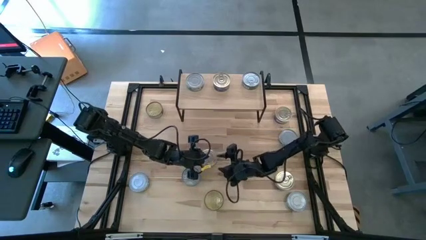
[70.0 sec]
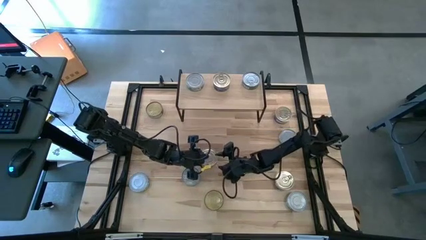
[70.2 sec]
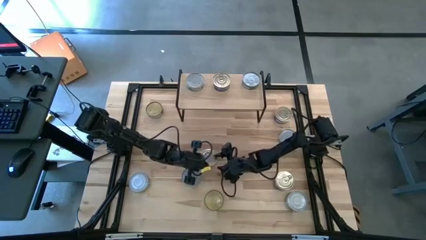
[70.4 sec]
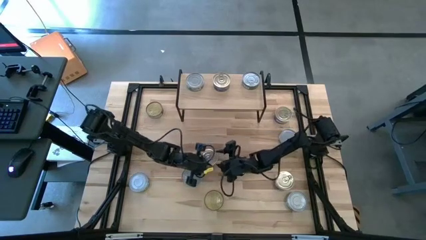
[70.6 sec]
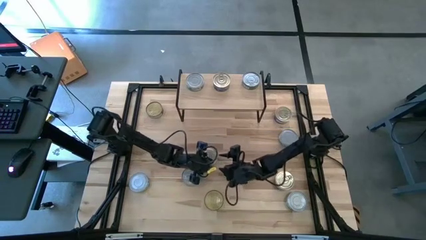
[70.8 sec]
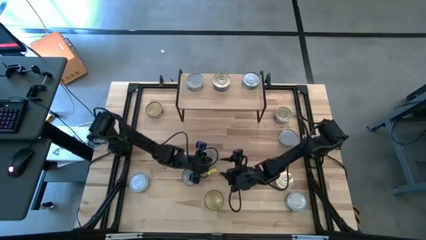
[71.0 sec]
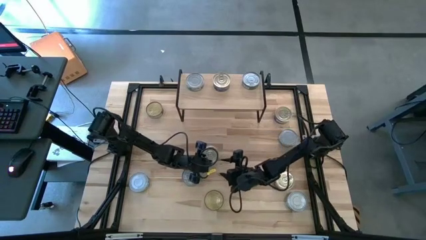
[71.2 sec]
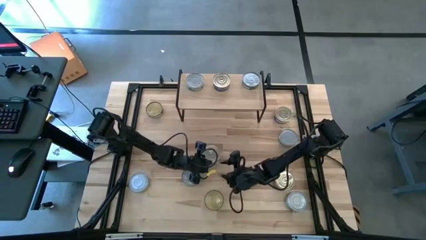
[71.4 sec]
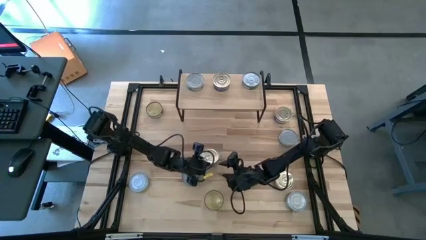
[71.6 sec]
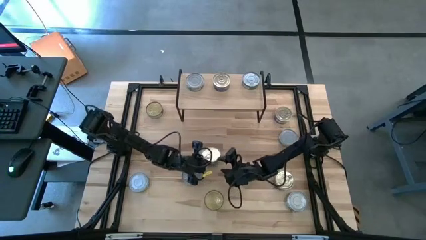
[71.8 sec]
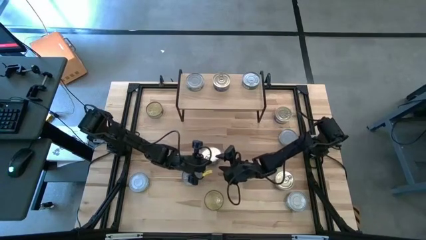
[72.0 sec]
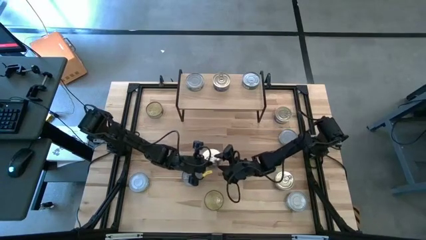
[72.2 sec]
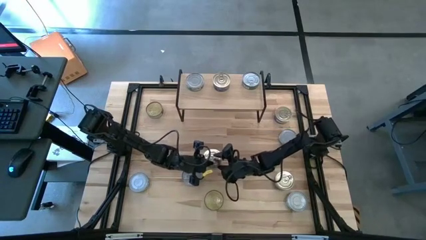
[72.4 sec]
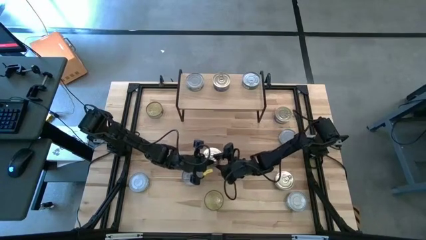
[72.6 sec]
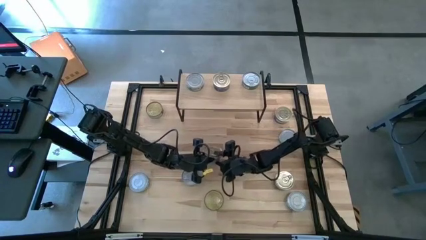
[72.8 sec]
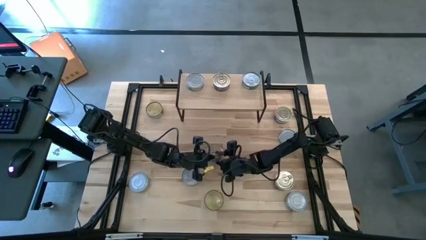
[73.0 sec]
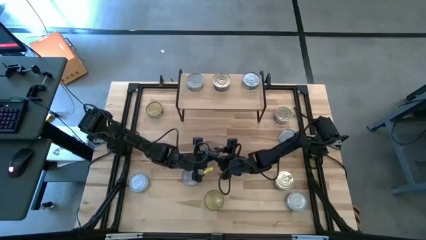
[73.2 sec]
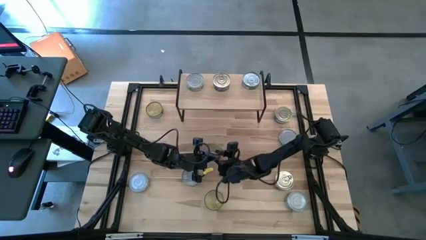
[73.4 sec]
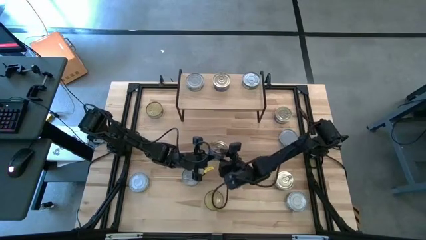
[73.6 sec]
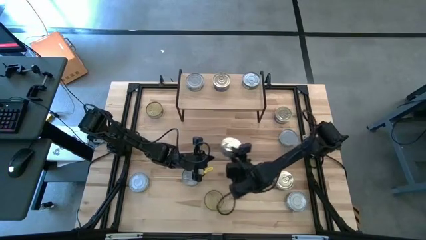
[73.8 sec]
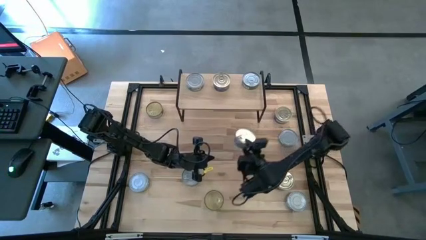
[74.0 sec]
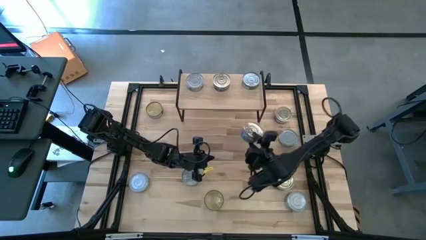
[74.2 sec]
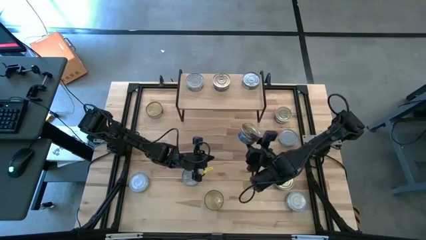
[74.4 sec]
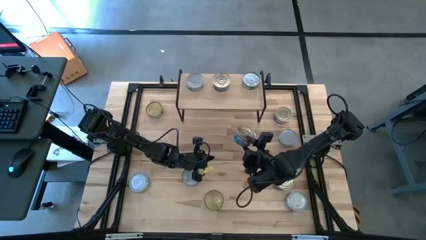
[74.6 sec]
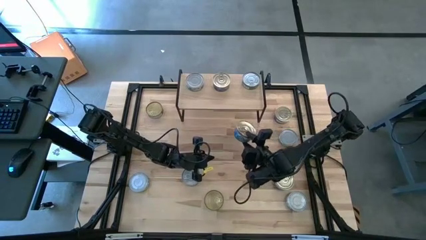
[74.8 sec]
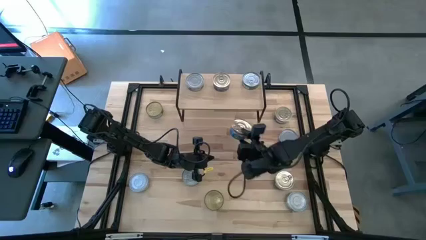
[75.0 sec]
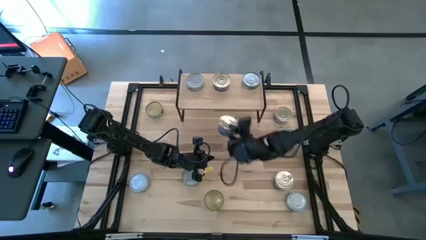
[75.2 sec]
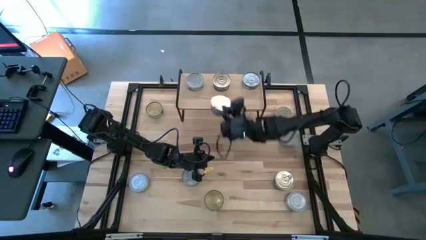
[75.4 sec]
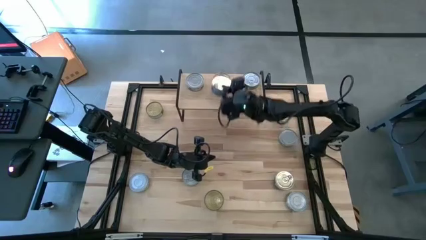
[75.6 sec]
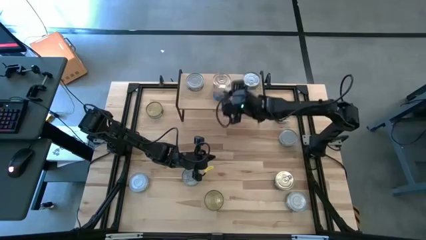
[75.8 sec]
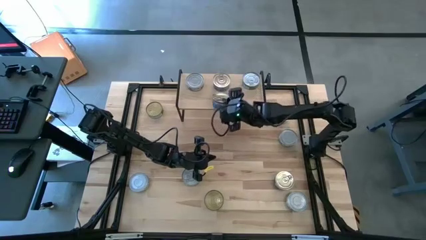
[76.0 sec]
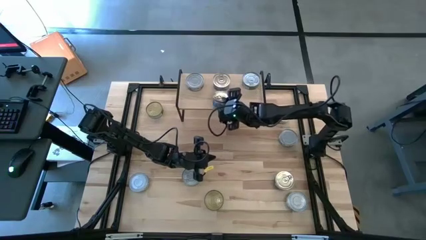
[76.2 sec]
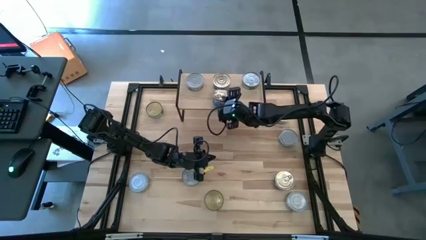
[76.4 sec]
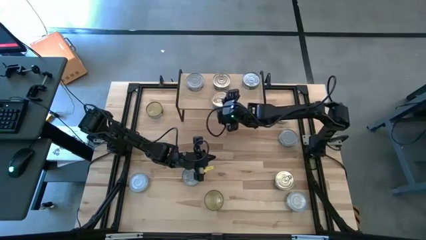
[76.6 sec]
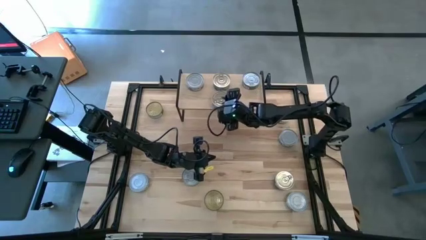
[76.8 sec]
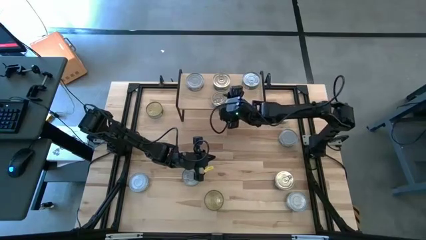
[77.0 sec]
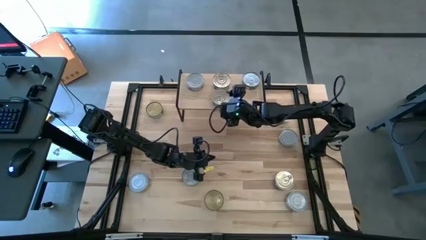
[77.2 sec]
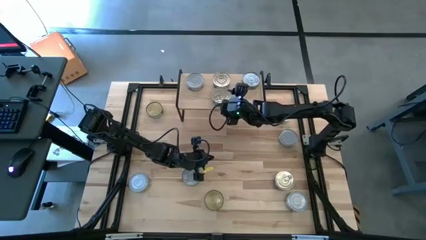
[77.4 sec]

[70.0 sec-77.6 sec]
Task: Stack canned seafood by type on shelf
Put the blue tuna can on the shelf

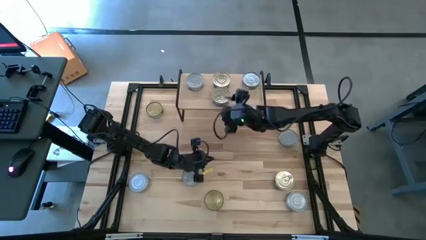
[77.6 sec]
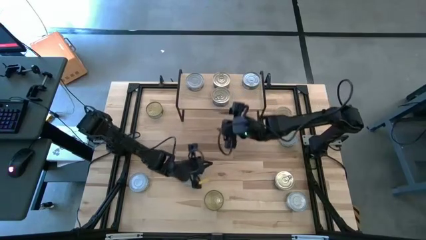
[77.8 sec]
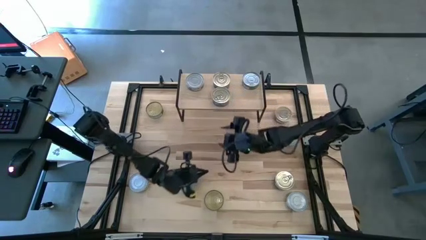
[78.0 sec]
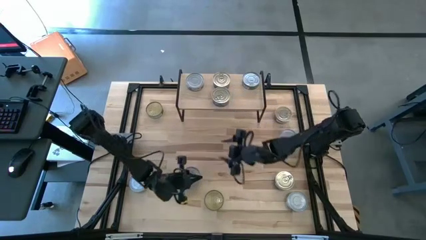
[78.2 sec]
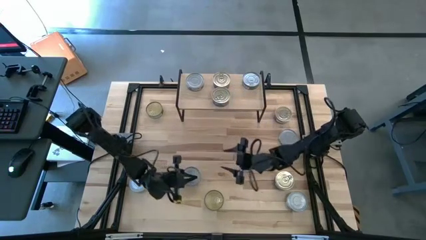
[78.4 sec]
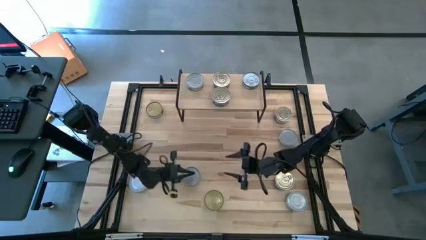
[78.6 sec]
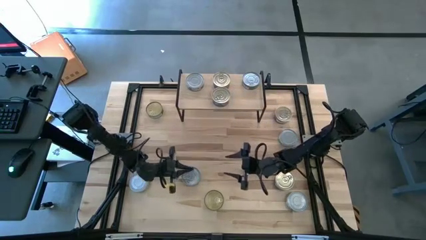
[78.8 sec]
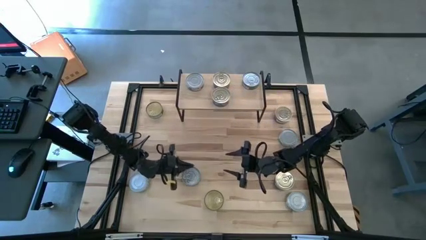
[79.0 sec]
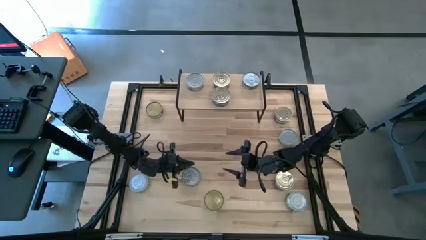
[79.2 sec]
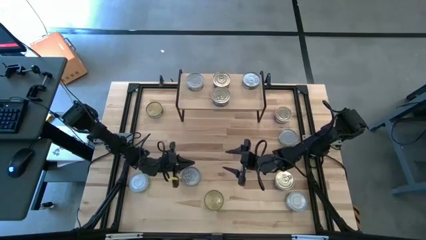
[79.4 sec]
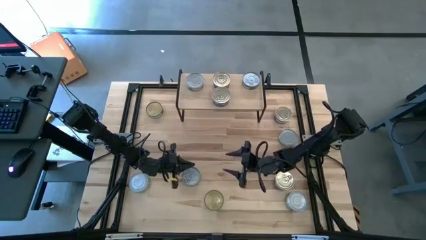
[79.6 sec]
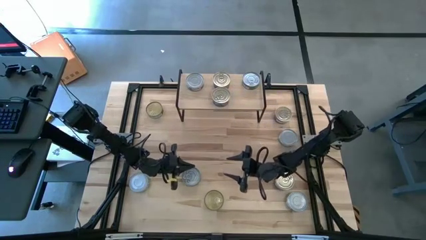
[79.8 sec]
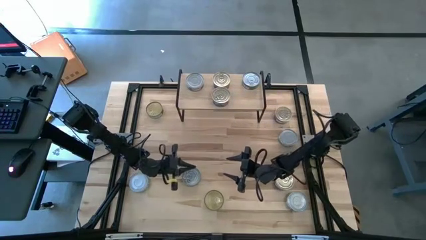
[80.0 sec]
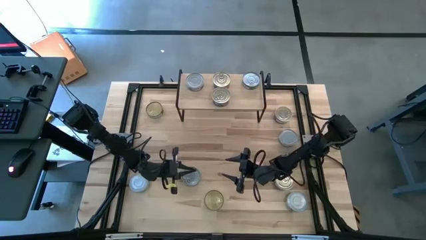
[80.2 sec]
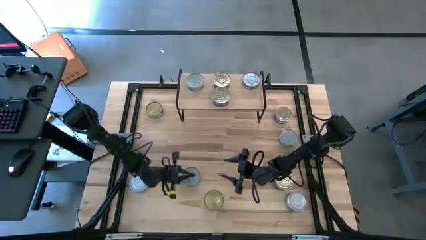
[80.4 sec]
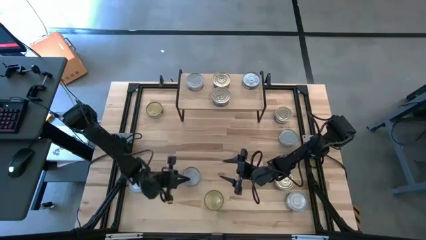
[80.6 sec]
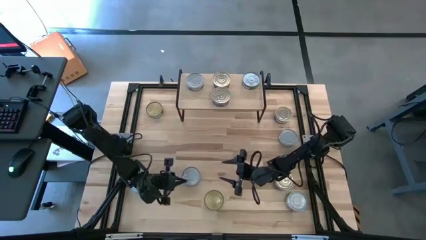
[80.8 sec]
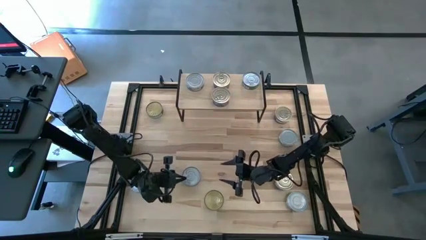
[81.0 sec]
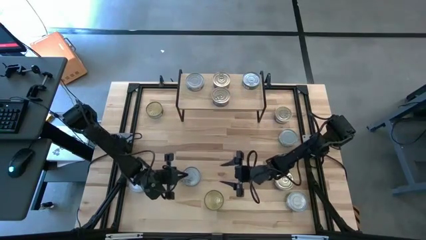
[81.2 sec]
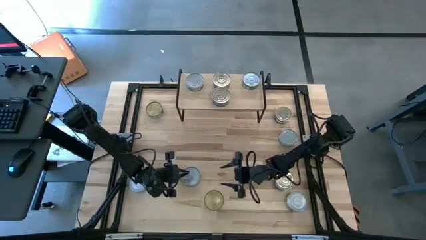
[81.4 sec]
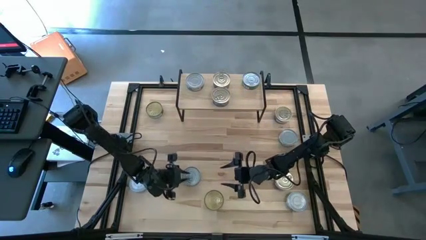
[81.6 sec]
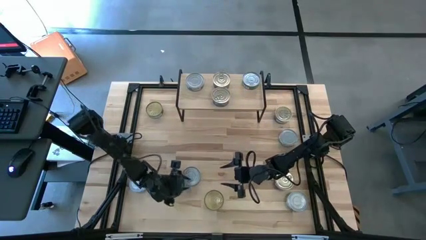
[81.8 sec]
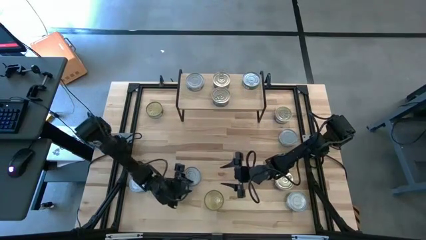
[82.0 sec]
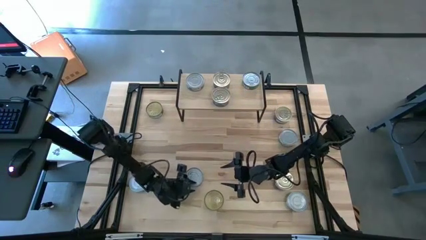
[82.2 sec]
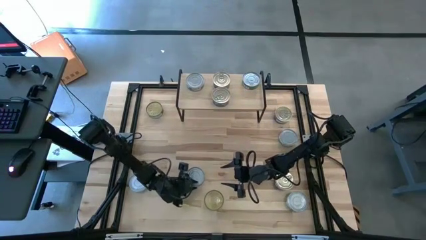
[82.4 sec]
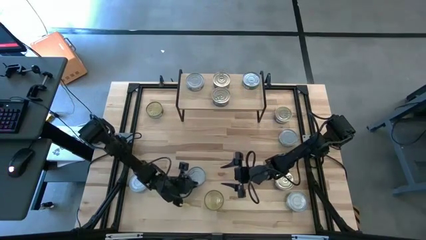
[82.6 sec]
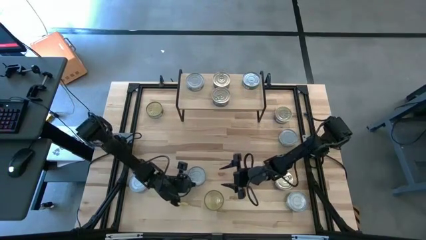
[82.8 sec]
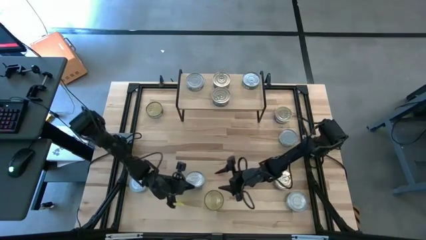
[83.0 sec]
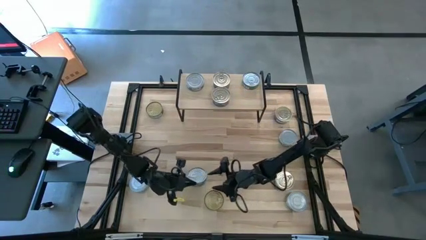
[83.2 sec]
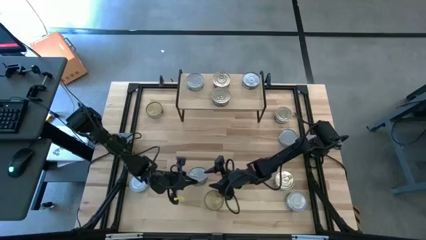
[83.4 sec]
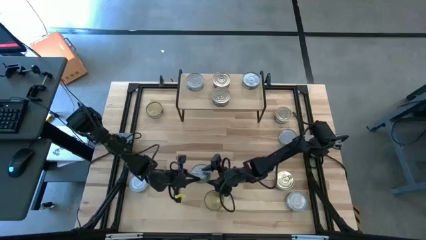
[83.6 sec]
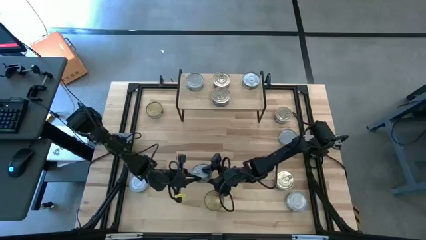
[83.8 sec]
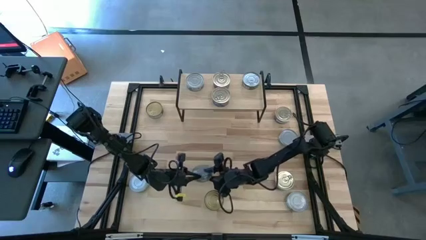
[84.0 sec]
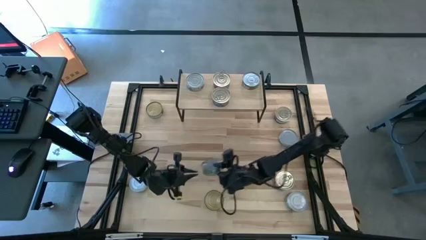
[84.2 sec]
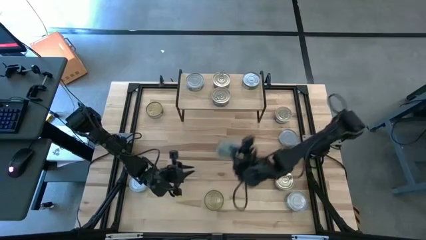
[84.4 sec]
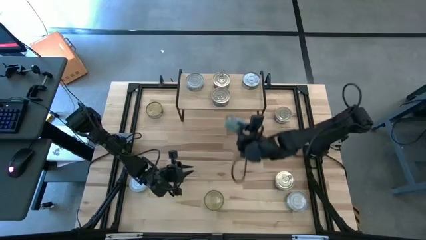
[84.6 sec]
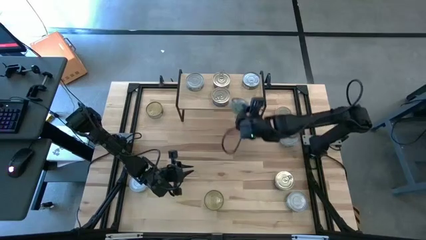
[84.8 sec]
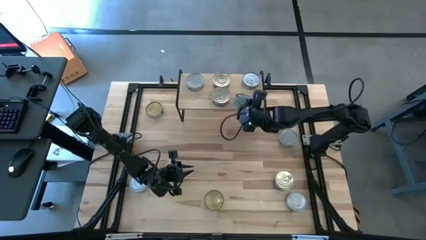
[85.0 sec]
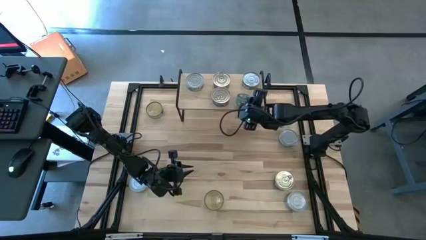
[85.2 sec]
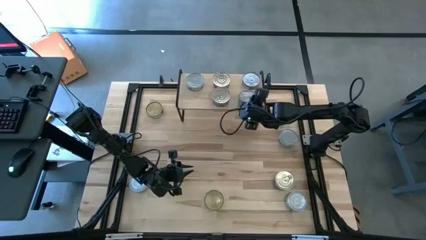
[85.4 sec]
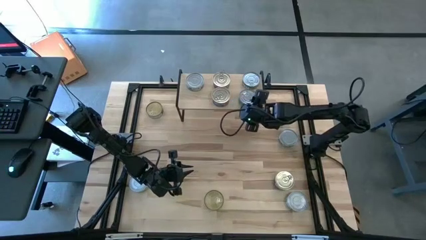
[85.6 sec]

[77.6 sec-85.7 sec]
Put the green tuna can on the shelf
